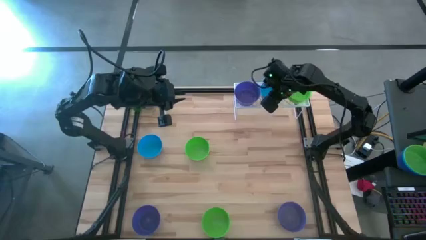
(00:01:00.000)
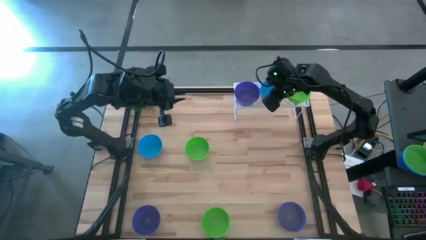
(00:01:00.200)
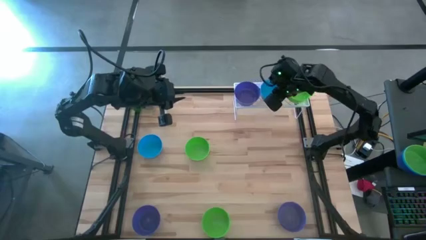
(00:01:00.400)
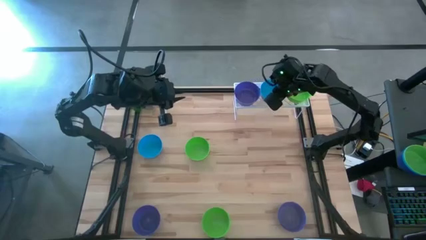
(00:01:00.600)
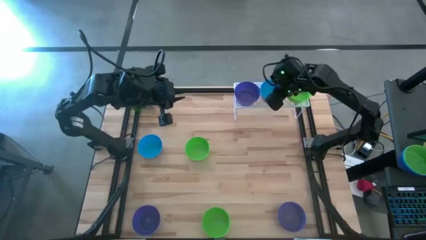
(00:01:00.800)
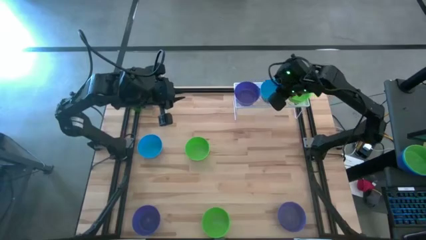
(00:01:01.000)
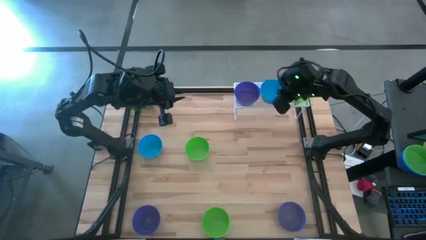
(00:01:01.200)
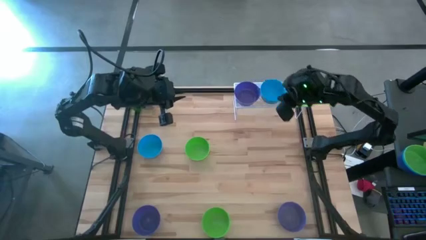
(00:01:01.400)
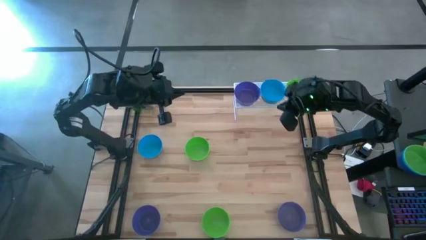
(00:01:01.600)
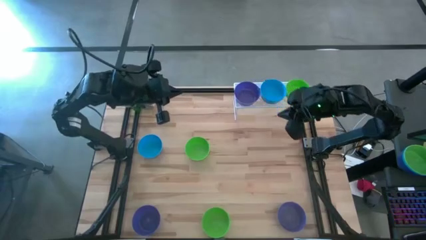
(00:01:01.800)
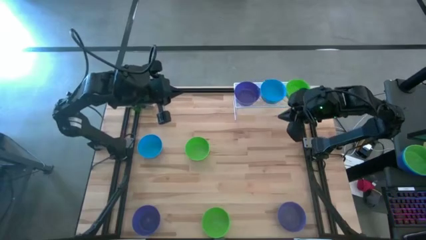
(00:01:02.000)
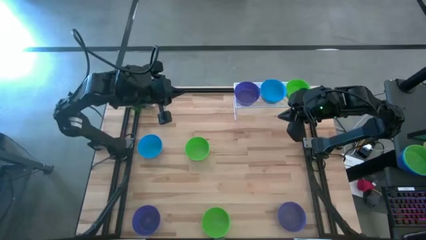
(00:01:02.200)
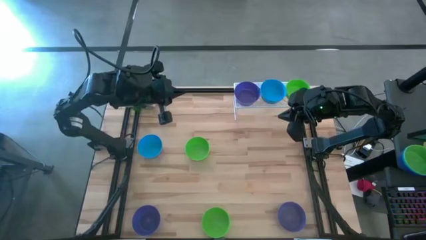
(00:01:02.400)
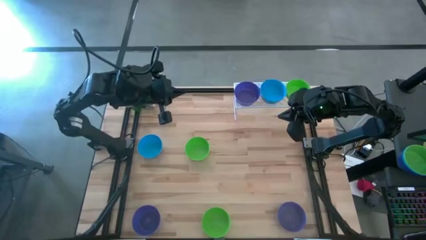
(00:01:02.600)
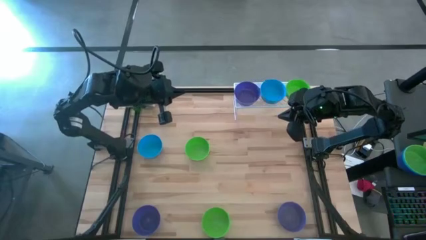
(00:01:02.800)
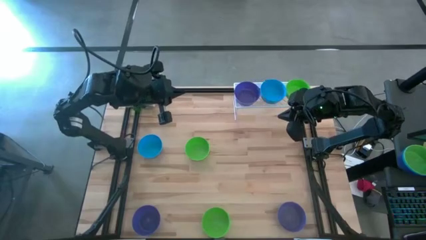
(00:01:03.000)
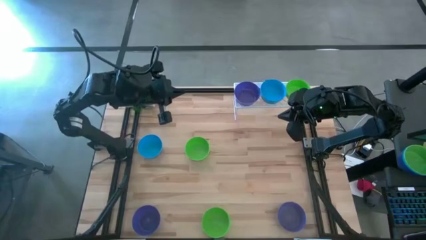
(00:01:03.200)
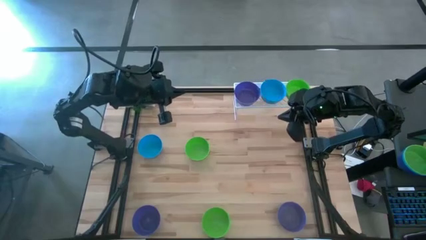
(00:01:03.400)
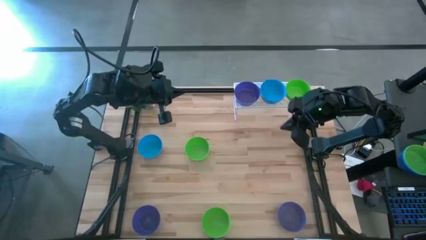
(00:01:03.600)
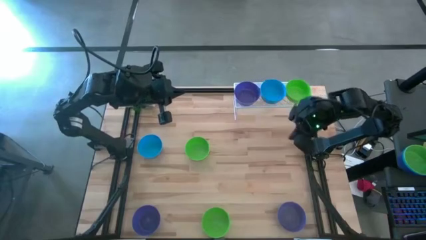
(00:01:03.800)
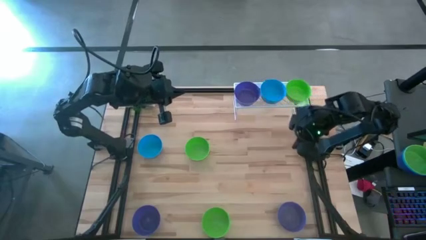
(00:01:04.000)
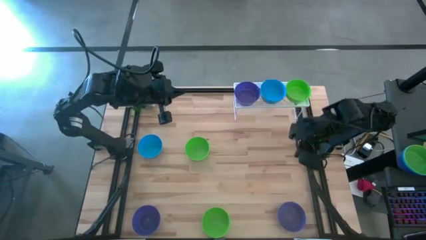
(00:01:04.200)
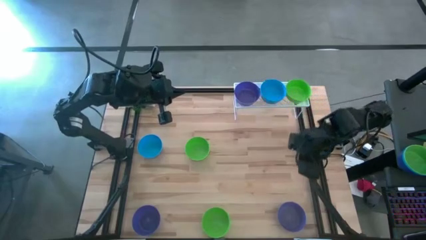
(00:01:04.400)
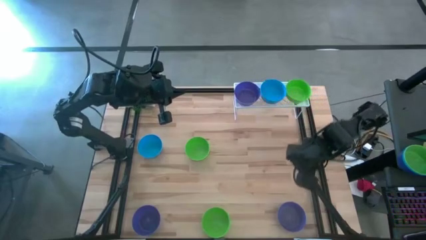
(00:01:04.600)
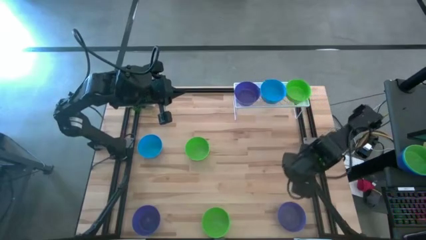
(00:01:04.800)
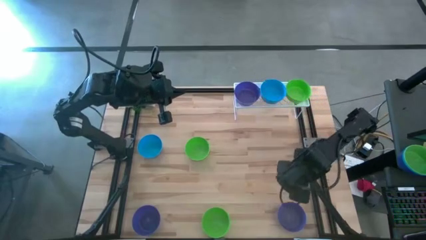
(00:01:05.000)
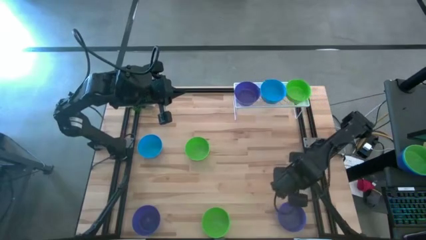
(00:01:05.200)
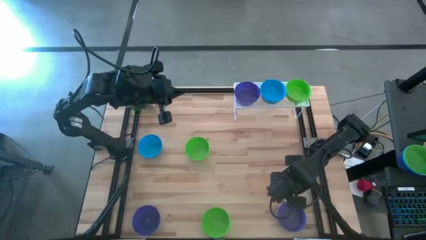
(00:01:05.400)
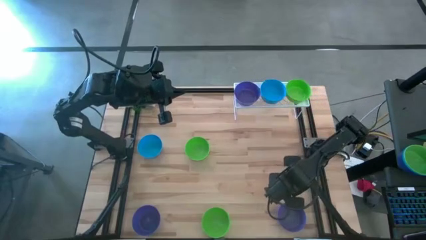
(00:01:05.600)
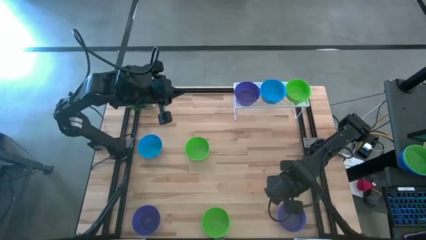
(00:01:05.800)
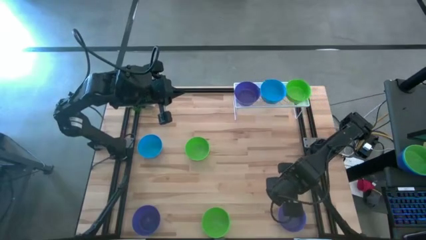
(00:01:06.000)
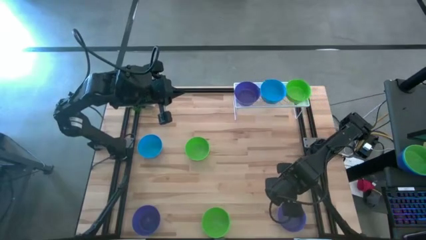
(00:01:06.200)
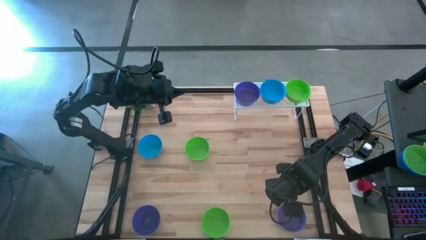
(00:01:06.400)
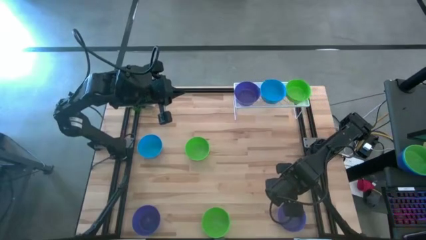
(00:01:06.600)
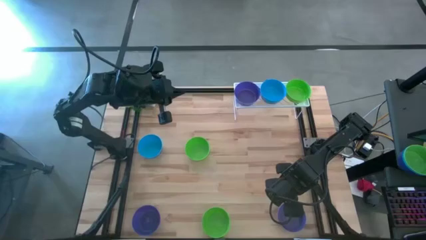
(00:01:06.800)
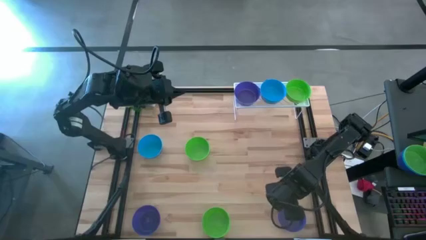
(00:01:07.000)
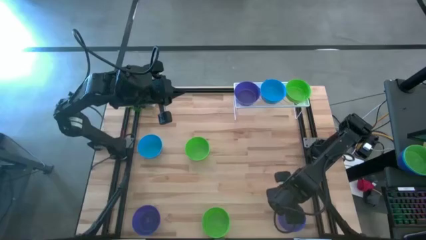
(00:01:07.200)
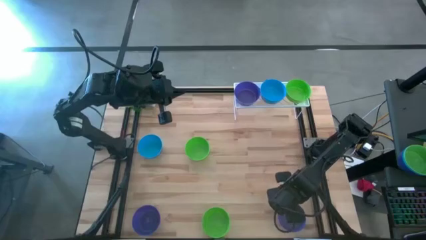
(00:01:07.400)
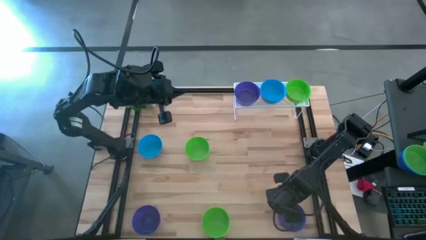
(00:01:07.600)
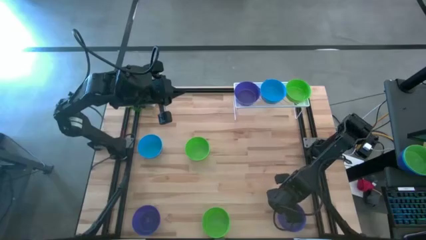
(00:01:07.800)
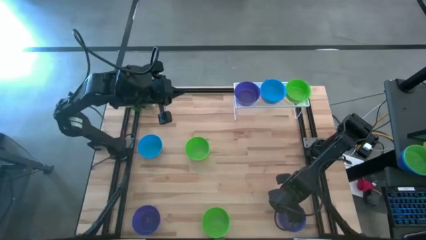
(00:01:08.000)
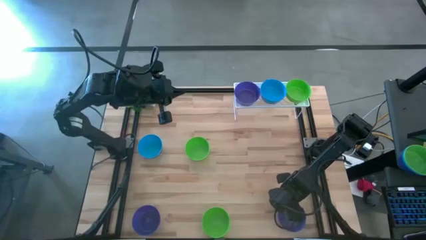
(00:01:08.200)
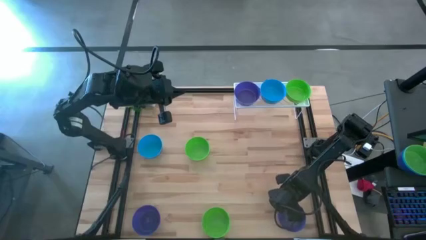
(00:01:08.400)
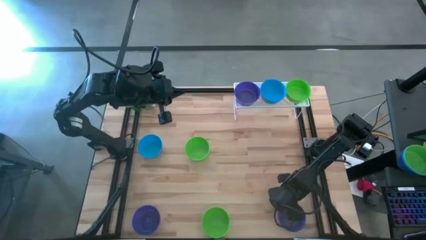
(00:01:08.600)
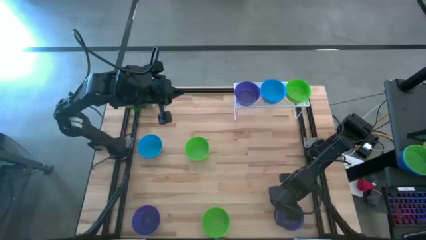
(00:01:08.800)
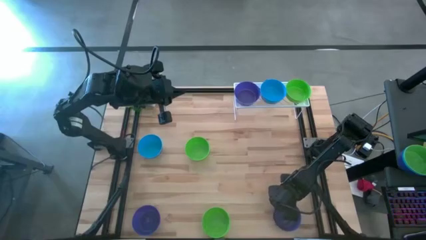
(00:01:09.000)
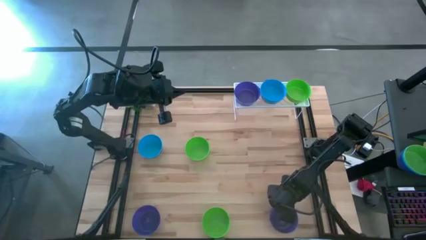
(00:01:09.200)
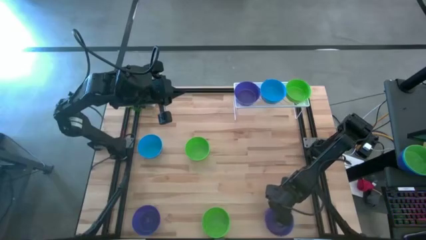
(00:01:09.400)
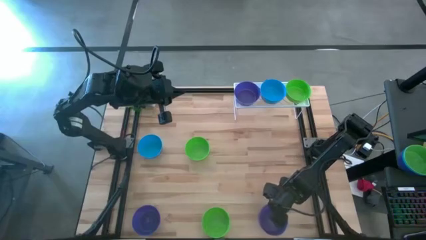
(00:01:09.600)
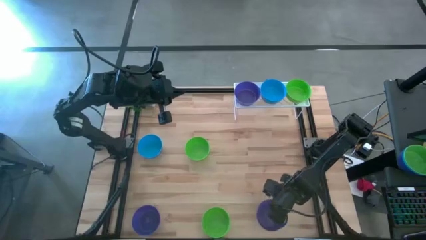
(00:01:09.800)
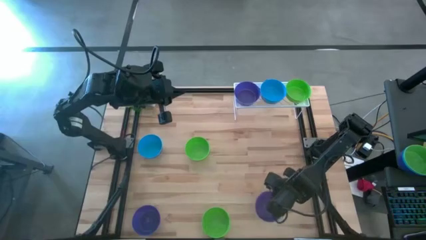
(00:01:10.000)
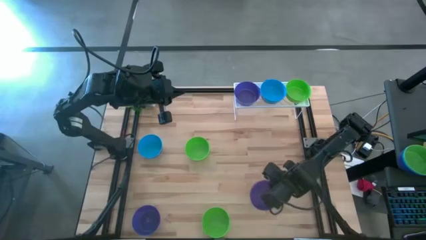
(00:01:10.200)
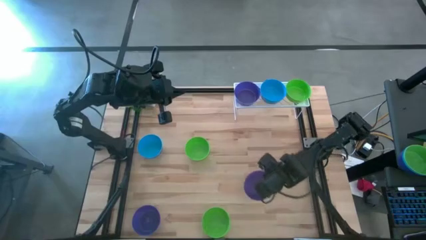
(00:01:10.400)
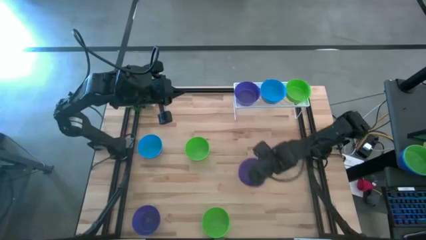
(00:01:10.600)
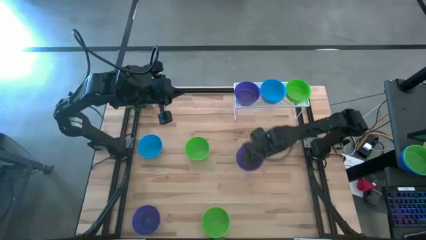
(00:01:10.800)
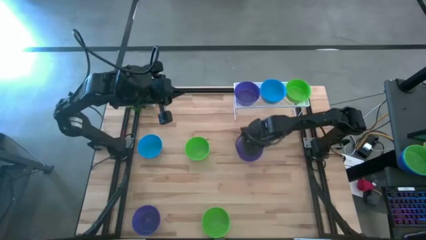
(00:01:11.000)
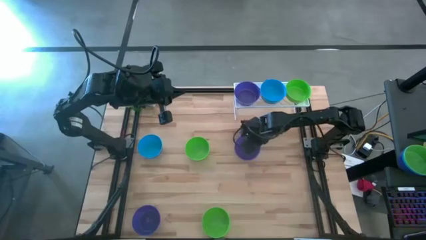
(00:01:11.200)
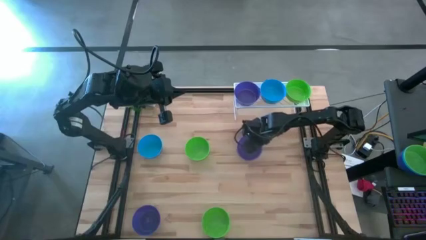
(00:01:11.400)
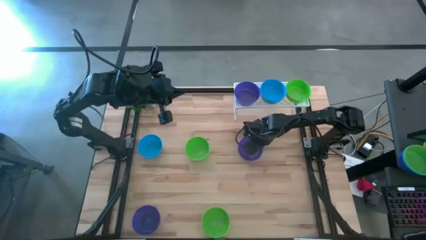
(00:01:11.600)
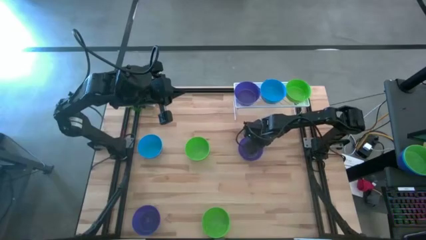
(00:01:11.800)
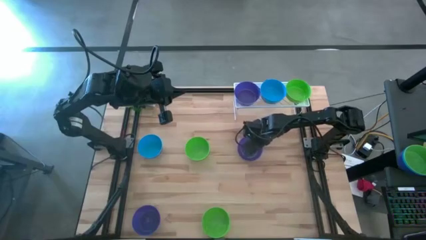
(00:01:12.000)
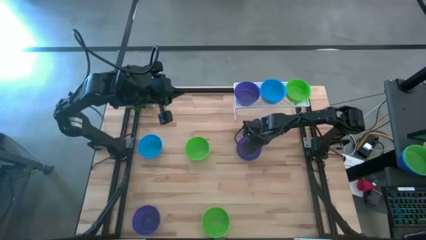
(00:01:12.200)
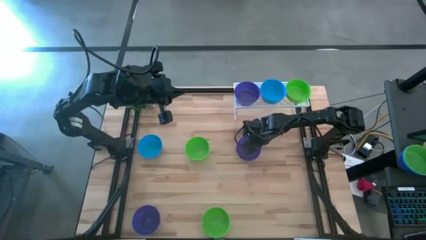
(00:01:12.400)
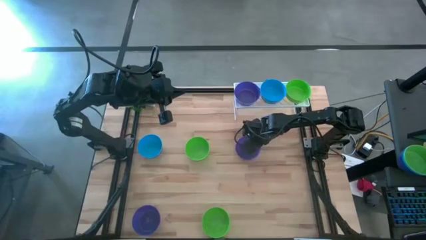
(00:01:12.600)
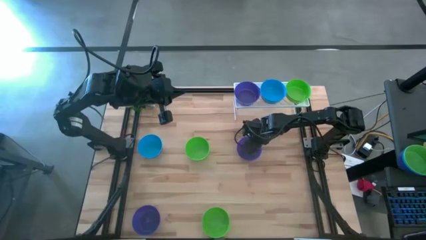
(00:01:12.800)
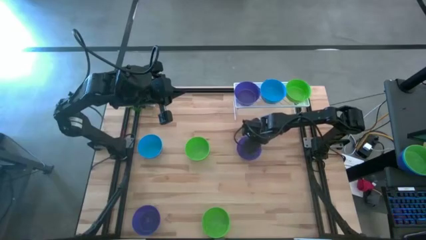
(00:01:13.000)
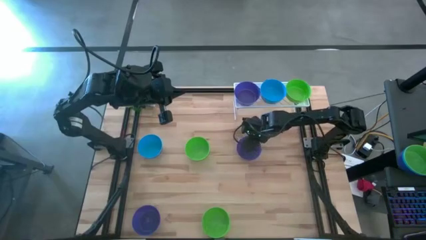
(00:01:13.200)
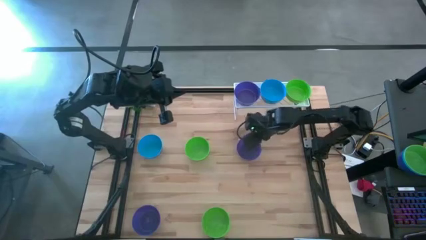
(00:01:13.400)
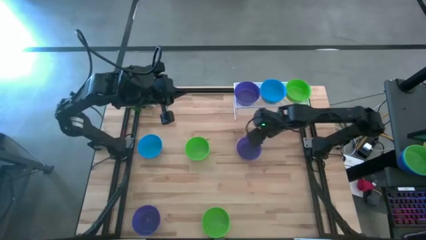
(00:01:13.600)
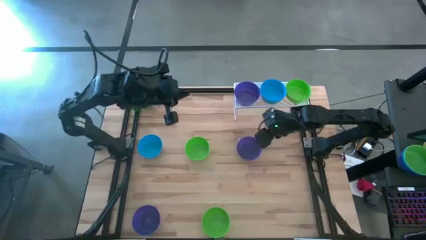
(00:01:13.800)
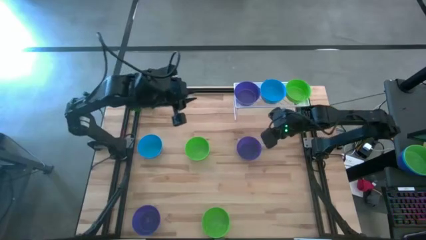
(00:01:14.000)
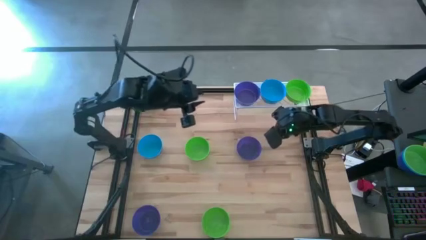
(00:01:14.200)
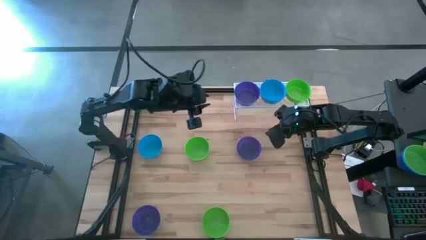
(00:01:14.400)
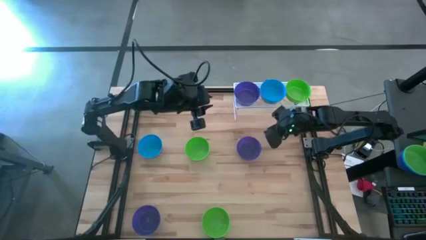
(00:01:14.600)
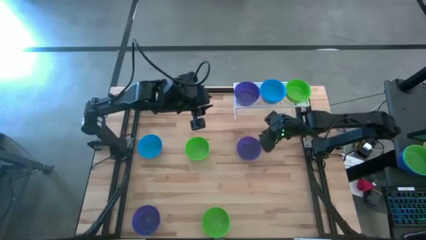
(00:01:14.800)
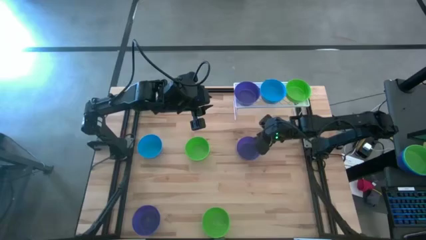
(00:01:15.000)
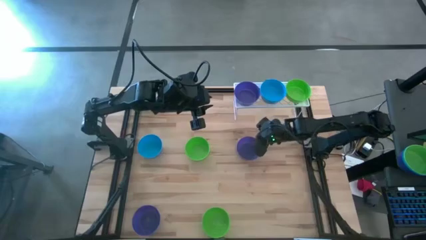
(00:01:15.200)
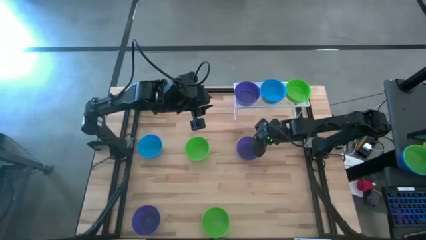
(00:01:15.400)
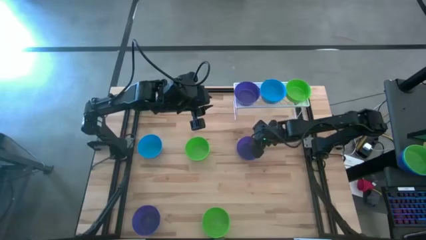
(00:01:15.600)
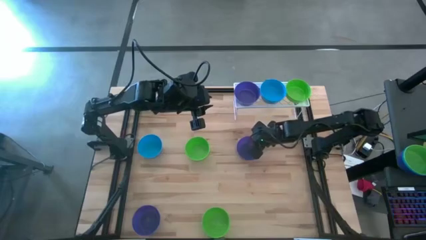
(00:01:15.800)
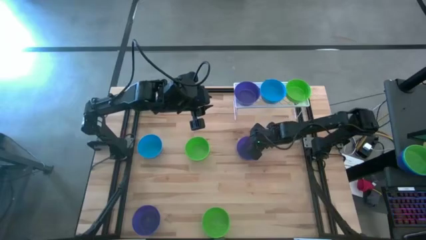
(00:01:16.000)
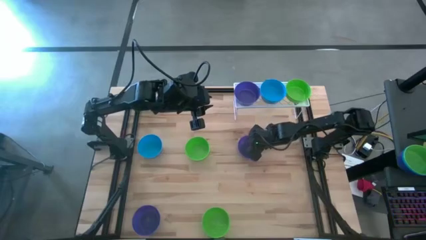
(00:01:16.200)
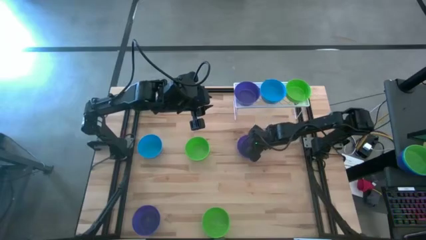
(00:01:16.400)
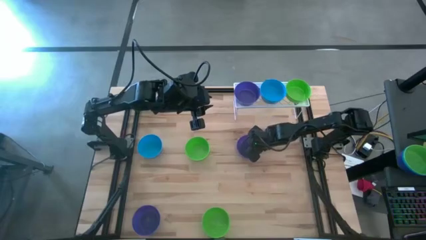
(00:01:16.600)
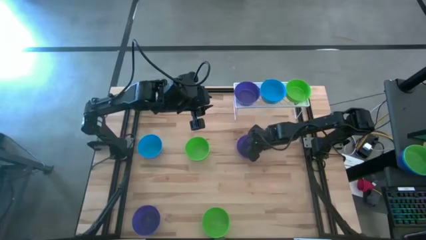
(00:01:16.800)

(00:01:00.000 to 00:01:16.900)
Task: Pick & Place Mini bowls
Stack the right violet bowl on top of the violet bowl on the shelf
